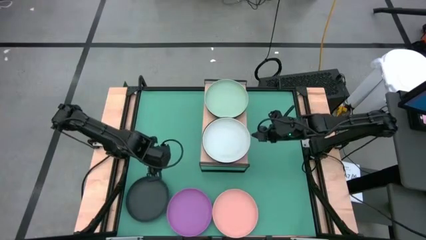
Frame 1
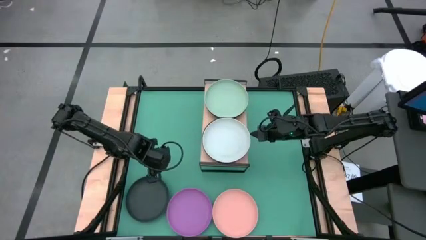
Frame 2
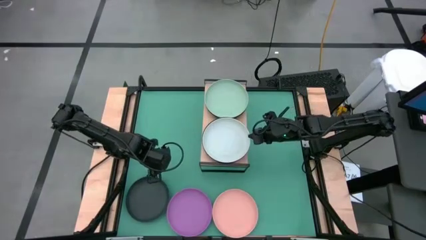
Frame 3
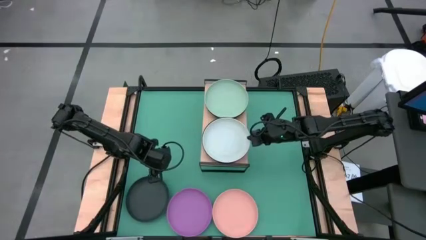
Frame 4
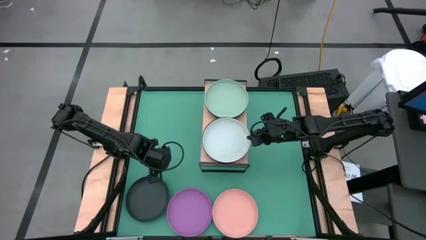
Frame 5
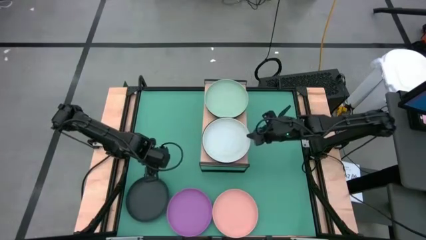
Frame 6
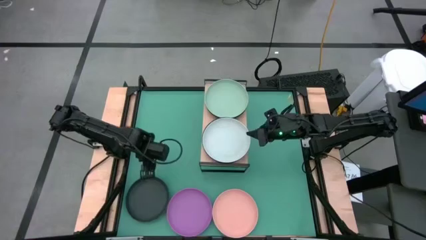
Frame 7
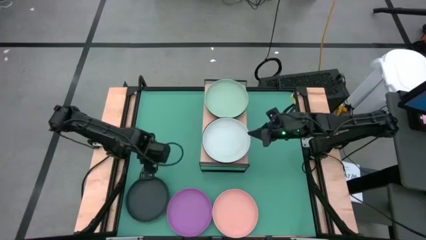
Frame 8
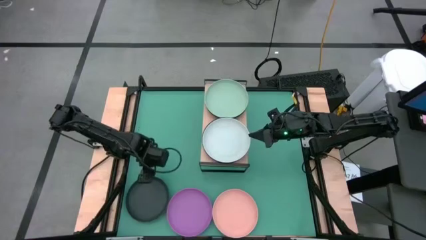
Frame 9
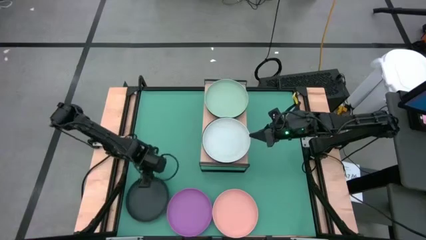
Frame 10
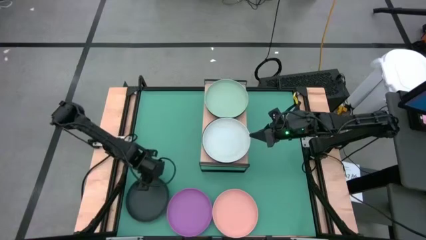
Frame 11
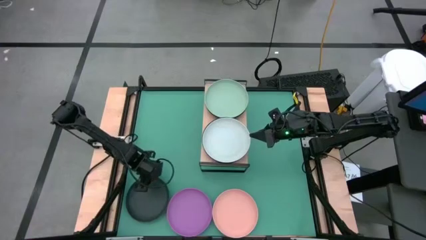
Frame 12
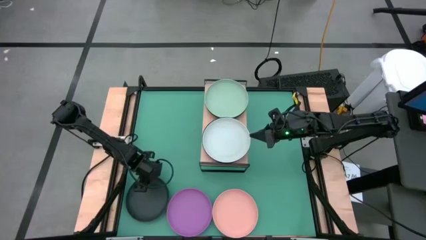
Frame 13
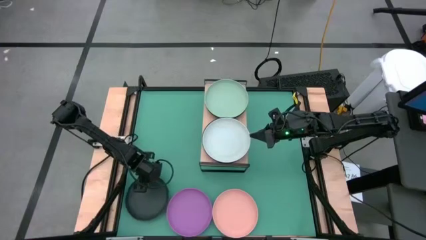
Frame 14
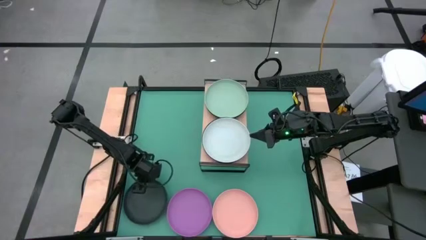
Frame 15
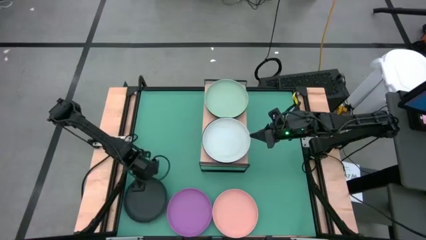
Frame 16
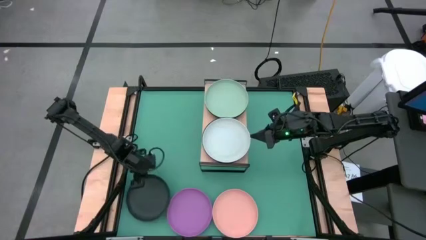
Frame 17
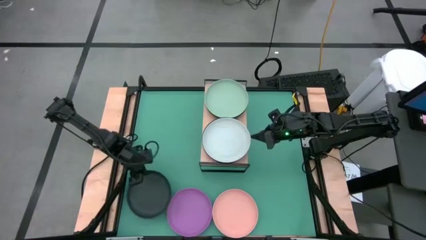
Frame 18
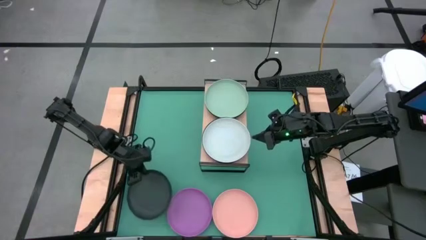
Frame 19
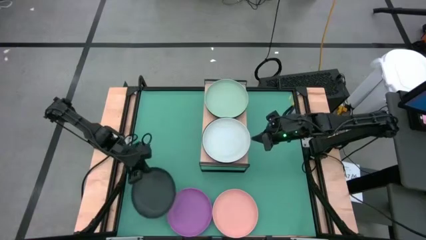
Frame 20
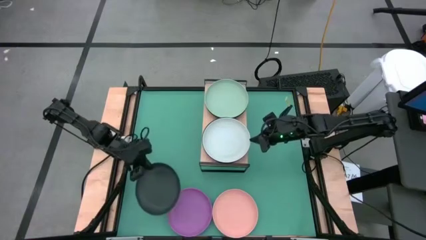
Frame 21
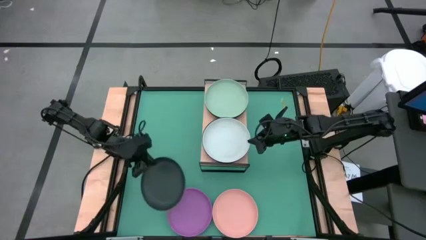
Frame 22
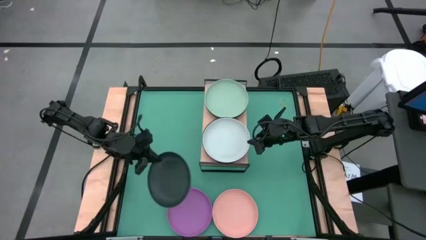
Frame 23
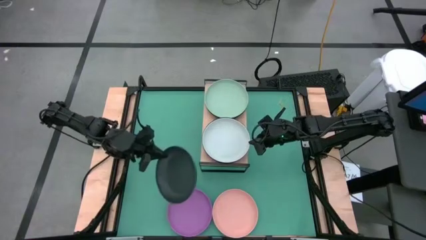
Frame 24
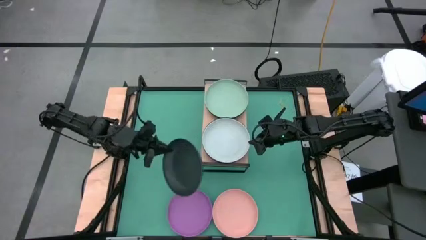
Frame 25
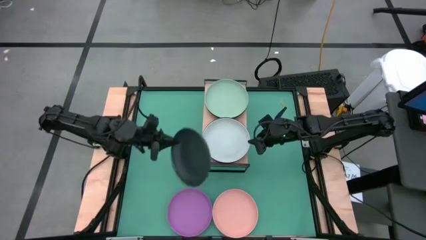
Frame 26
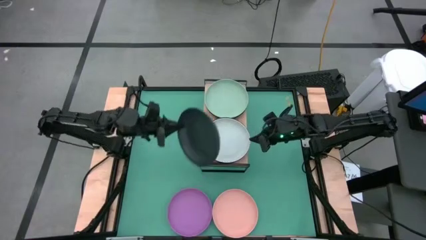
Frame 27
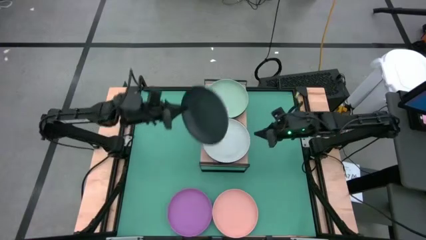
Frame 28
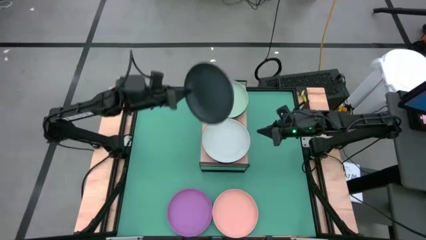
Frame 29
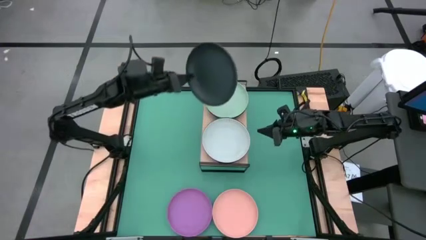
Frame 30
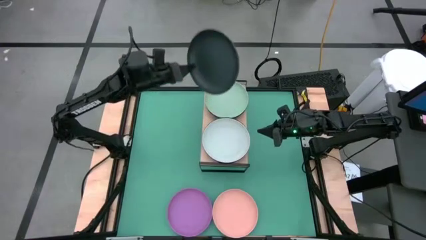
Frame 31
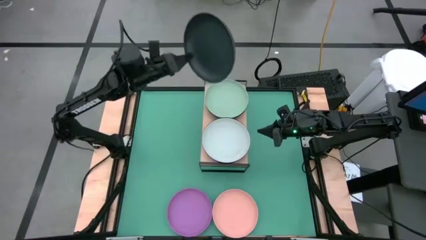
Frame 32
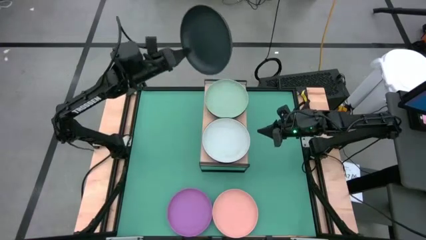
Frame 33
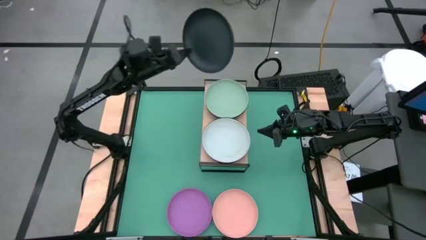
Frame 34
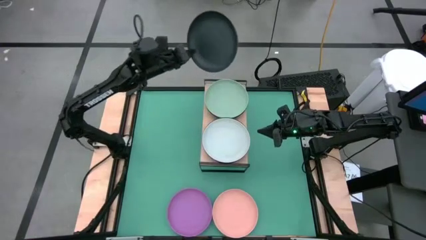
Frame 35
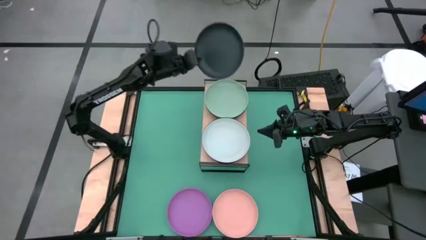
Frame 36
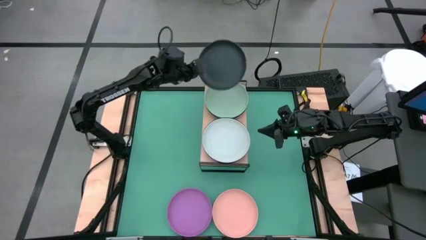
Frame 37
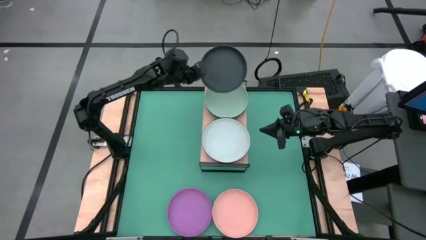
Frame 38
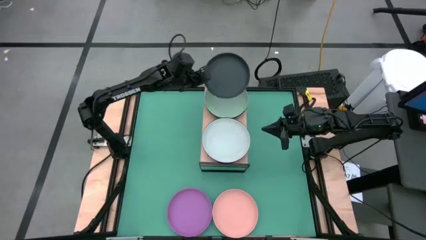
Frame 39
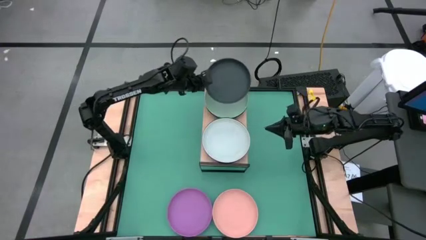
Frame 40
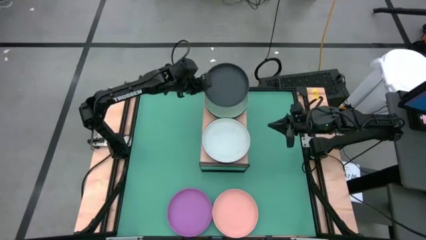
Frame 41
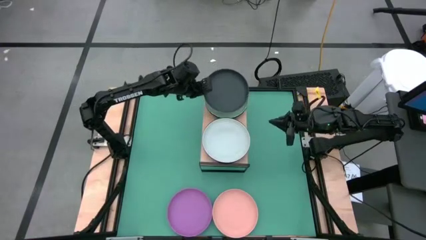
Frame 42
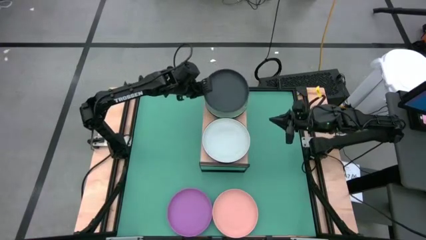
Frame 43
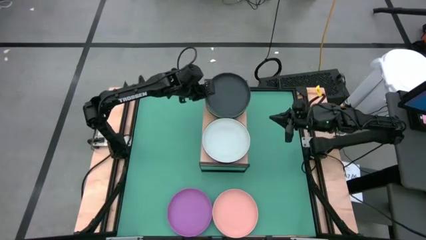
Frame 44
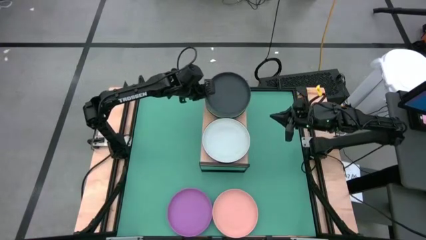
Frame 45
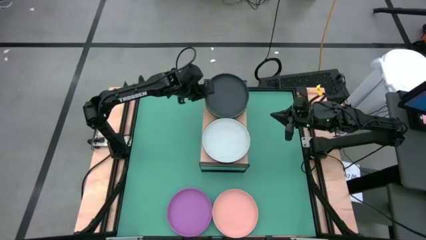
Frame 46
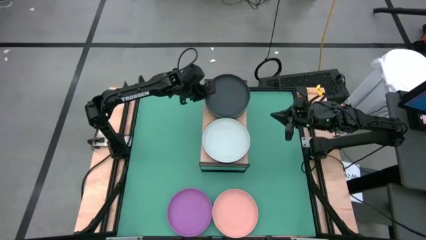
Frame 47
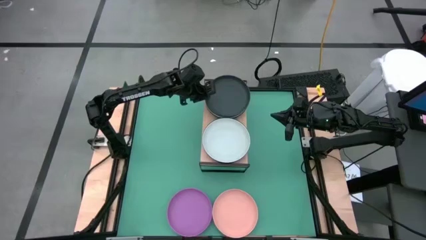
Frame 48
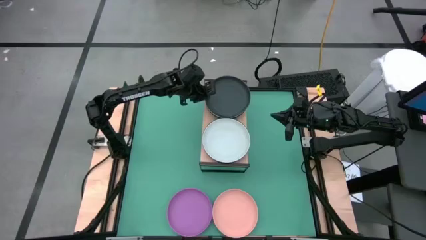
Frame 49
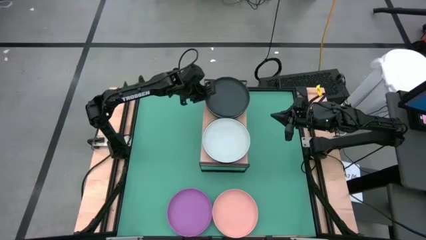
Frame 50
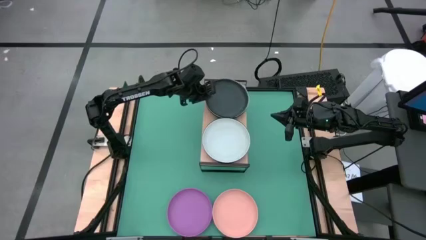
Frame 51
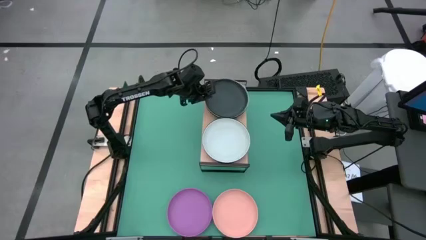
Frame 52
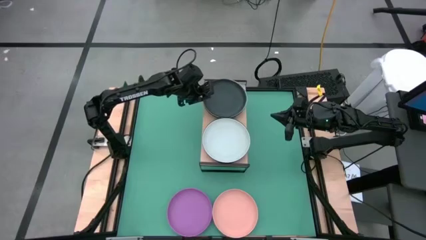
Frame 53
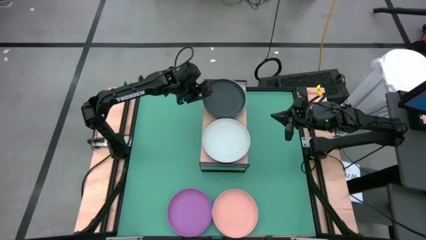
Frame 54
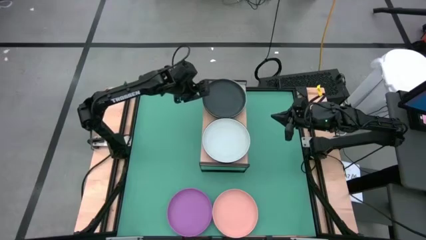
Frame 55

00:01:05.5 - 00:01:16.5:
Task: Place and stack plates onto a shelf
Stack the black plate on top of the light green plate

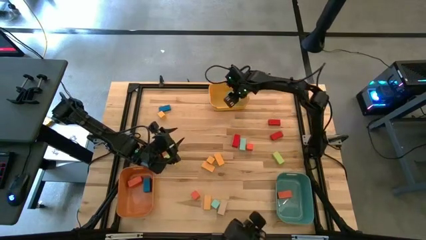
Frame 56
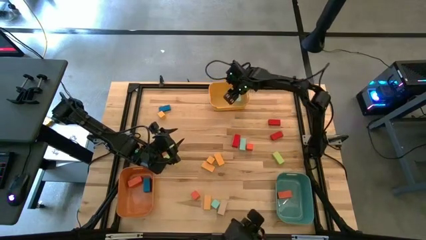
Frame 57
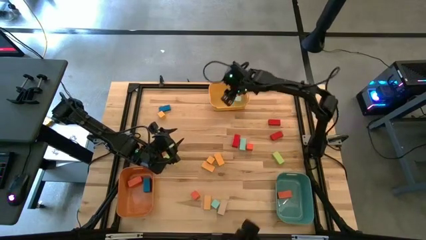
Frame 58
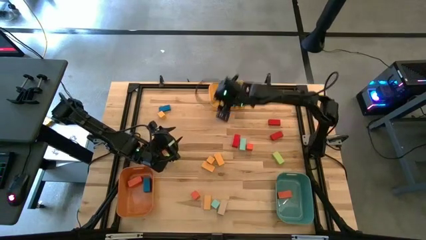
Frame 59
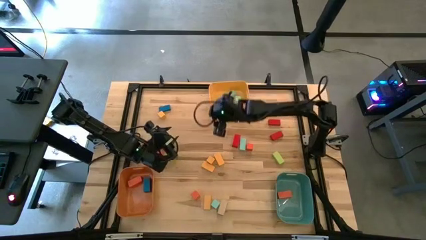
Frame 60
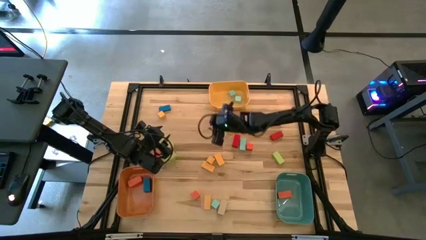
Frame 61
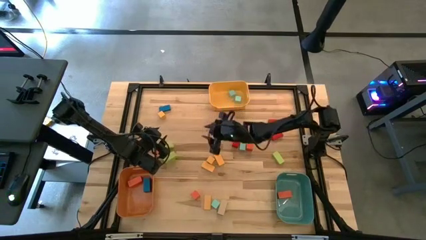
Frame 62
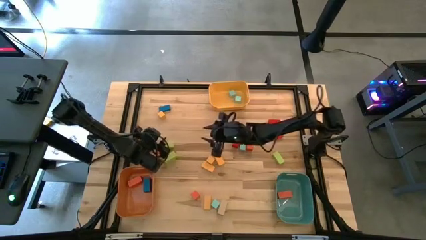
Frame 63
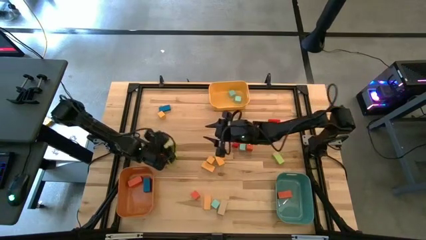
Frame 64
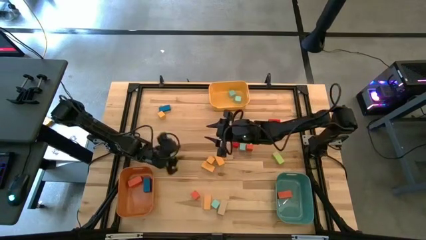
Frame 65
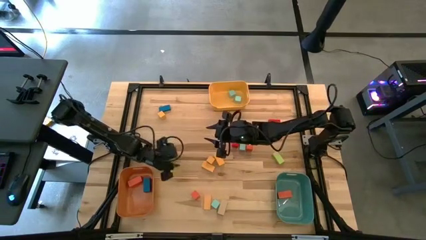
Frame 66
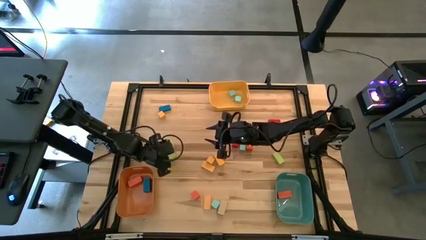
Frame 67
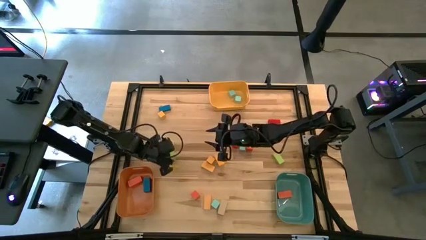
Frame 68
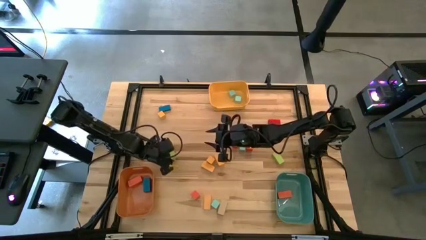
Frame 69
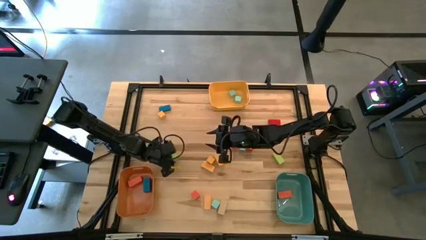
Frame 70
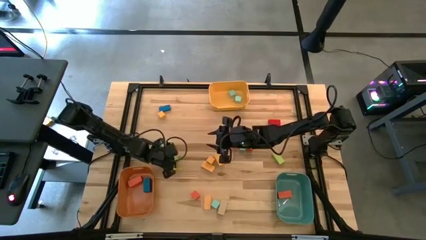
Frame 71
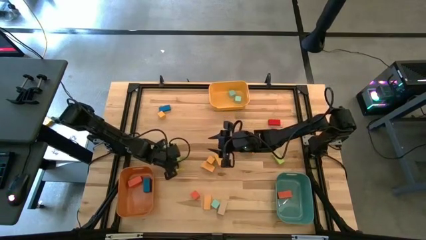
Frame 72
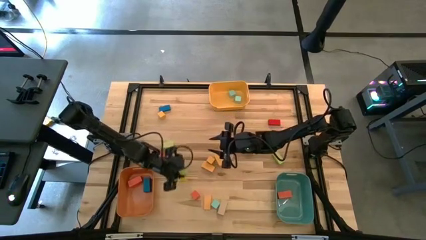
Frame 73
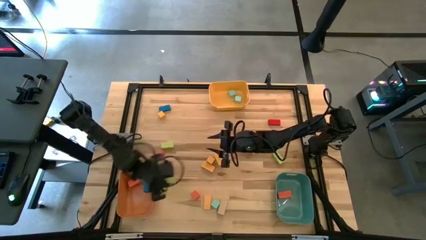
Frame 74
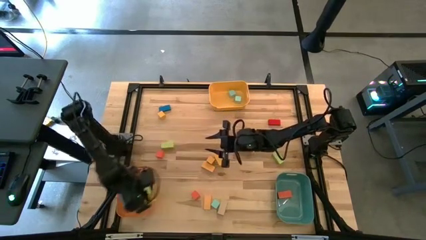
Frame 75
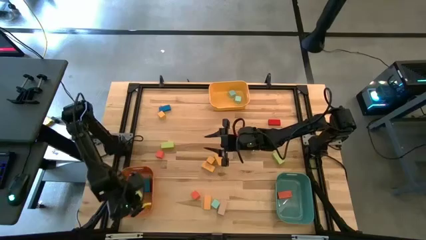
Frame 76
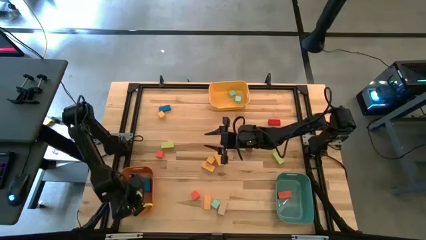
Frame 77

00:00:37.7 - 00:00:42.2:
Task: Sort blocks by size
Put the thick light green block into the orange bin
